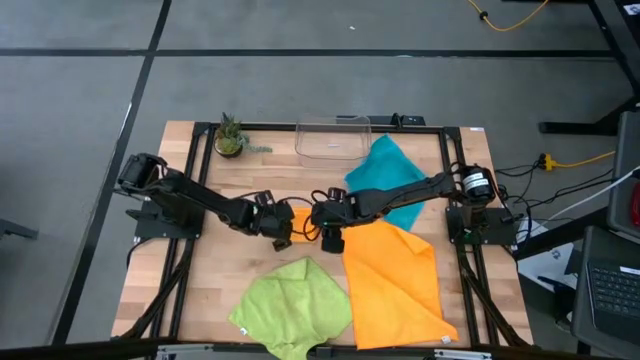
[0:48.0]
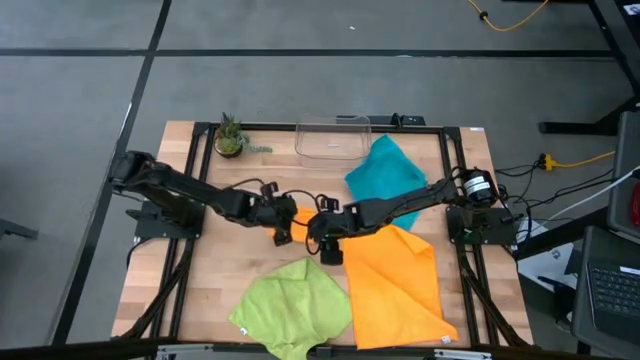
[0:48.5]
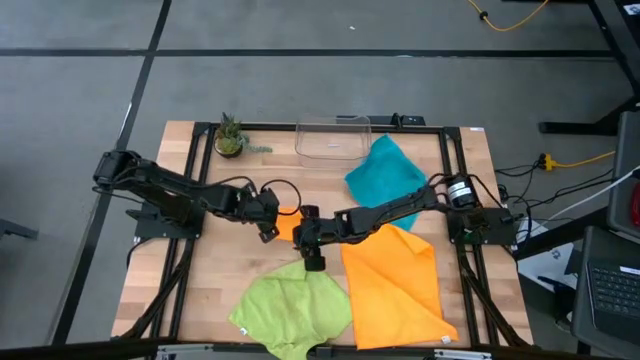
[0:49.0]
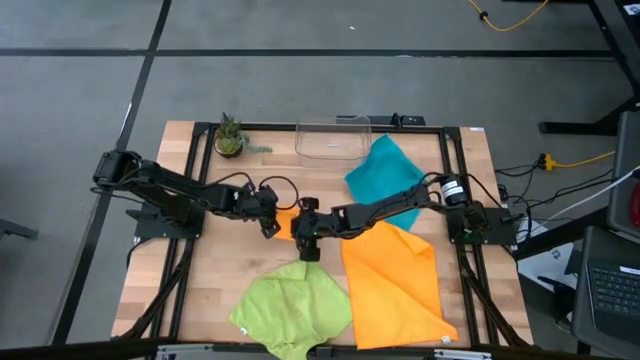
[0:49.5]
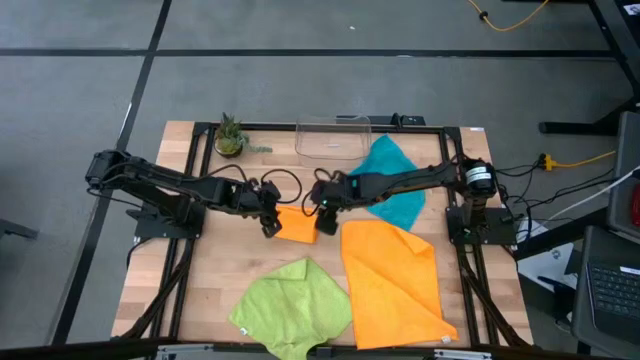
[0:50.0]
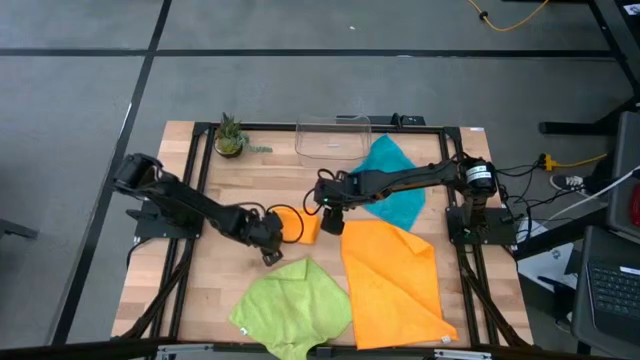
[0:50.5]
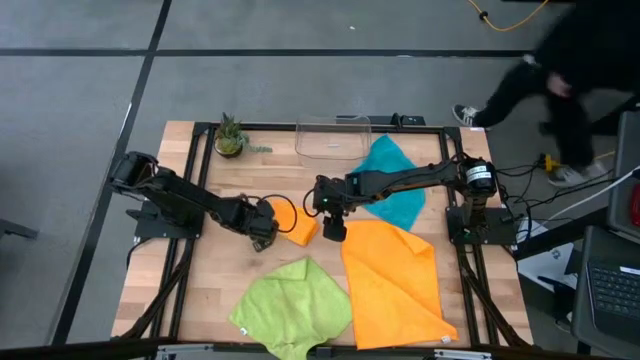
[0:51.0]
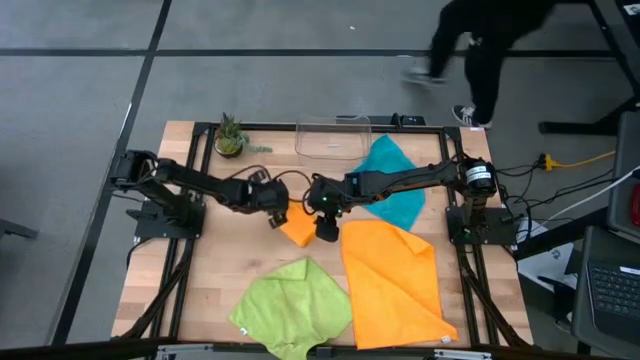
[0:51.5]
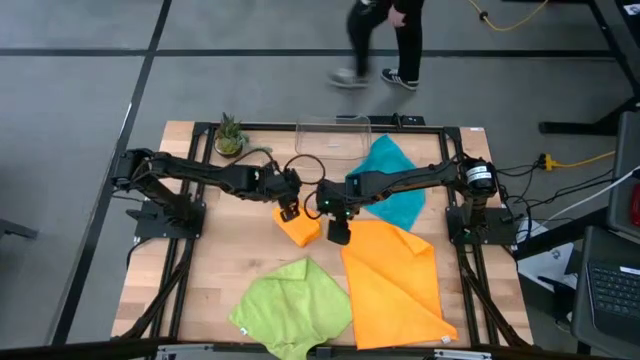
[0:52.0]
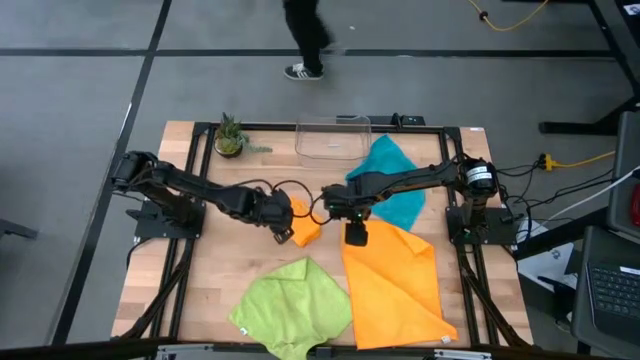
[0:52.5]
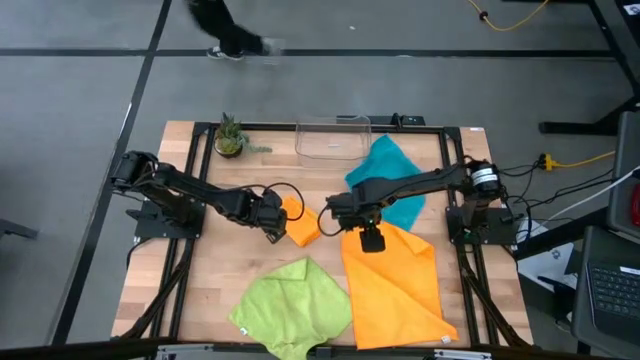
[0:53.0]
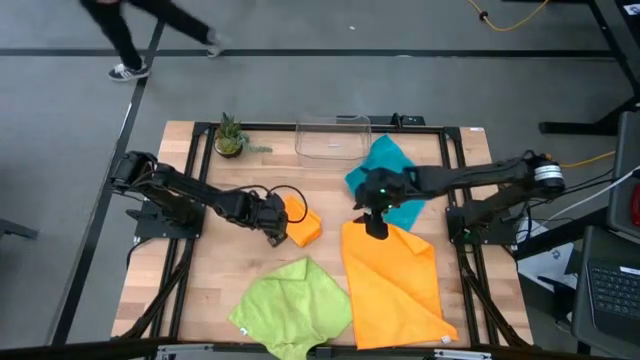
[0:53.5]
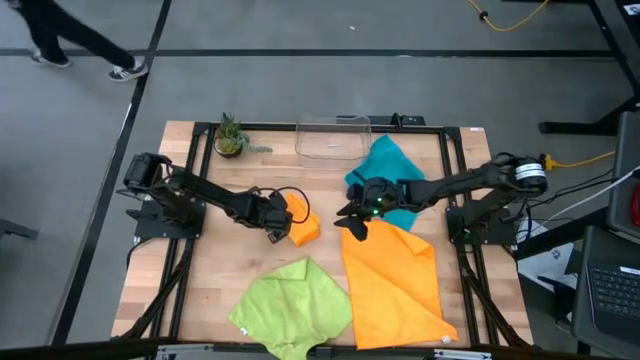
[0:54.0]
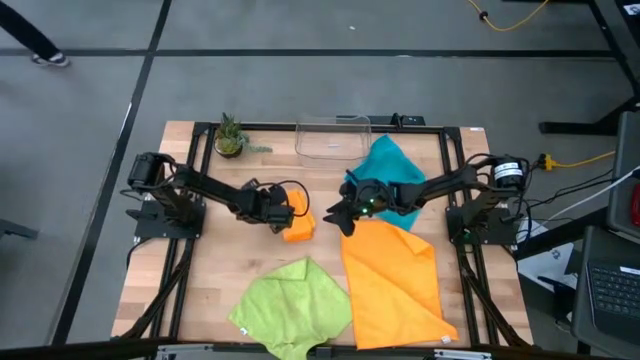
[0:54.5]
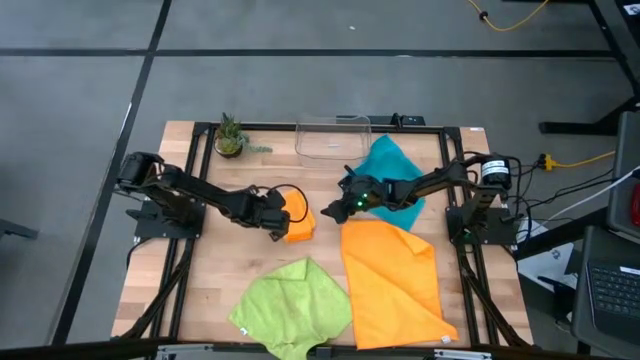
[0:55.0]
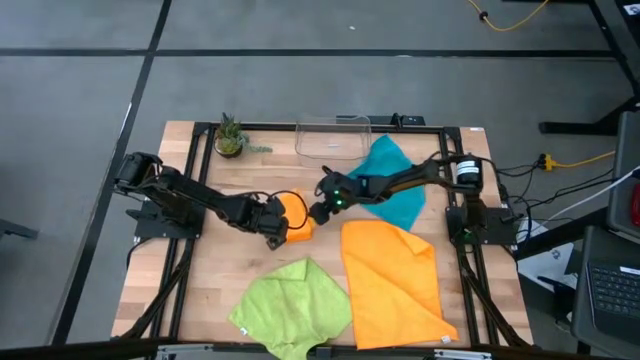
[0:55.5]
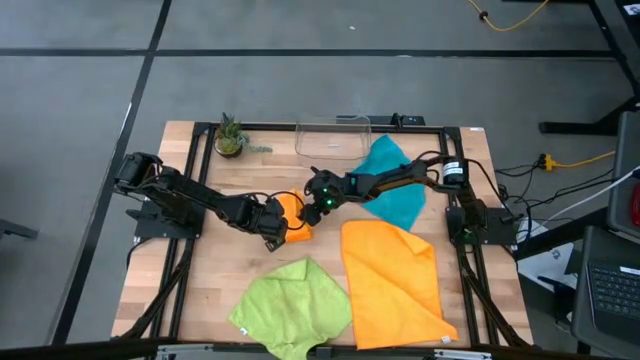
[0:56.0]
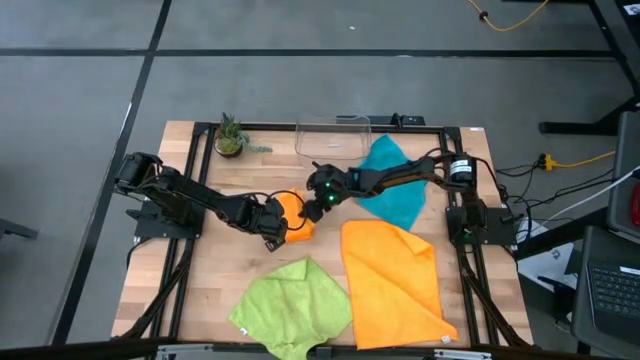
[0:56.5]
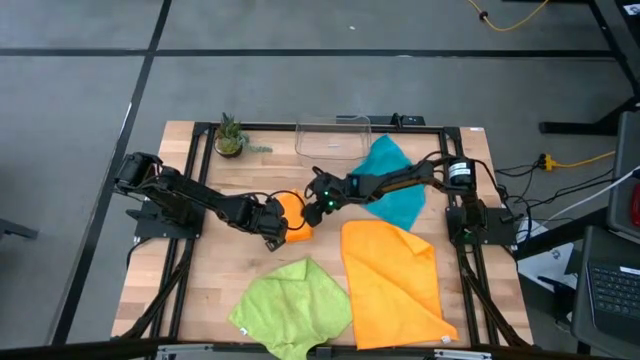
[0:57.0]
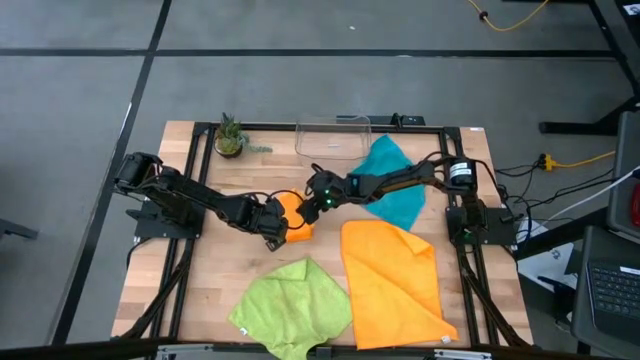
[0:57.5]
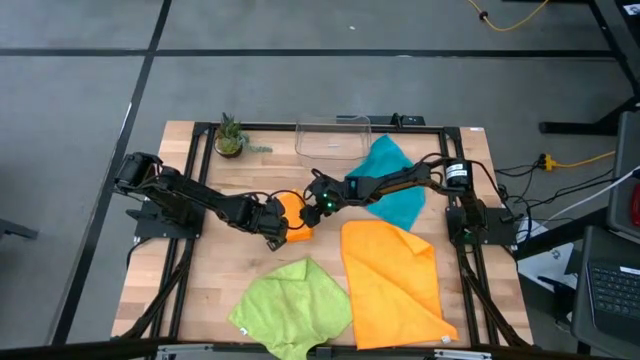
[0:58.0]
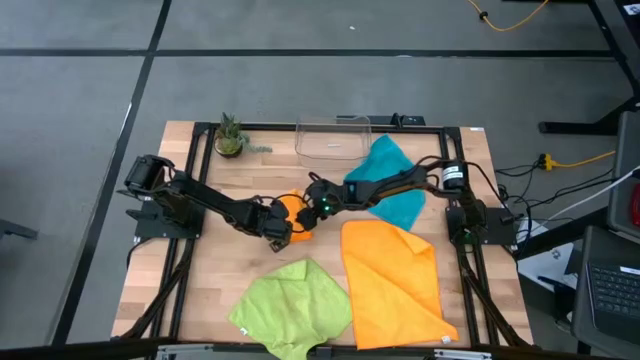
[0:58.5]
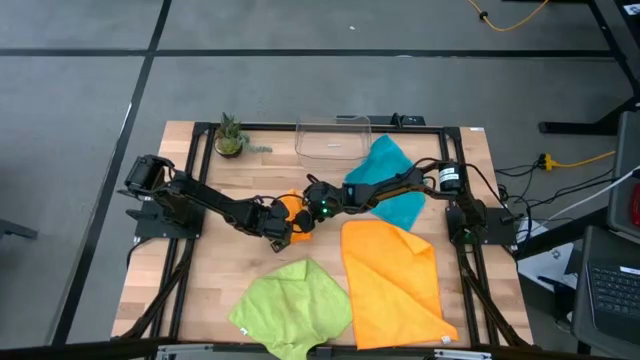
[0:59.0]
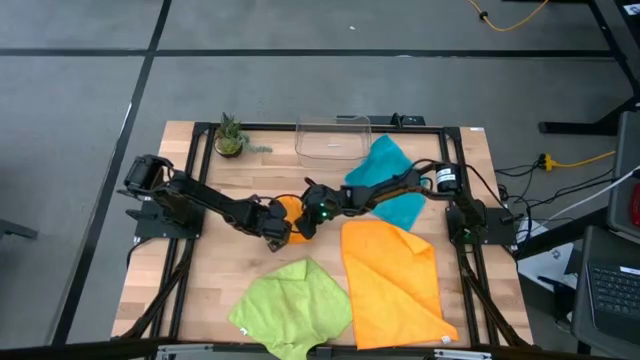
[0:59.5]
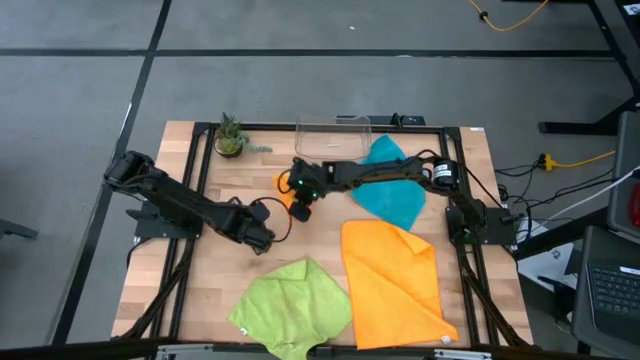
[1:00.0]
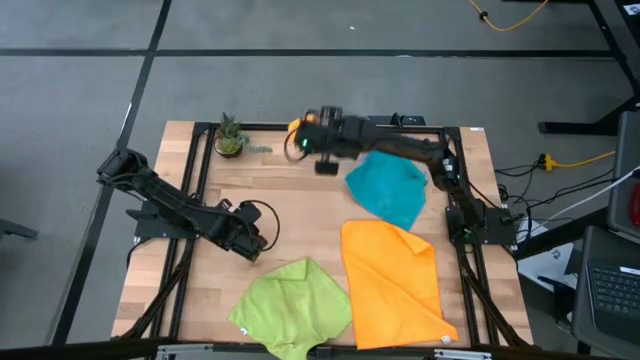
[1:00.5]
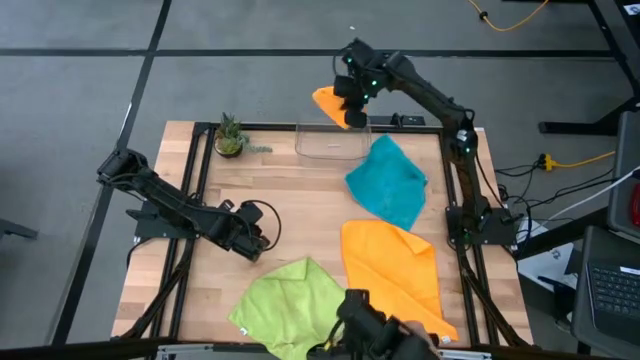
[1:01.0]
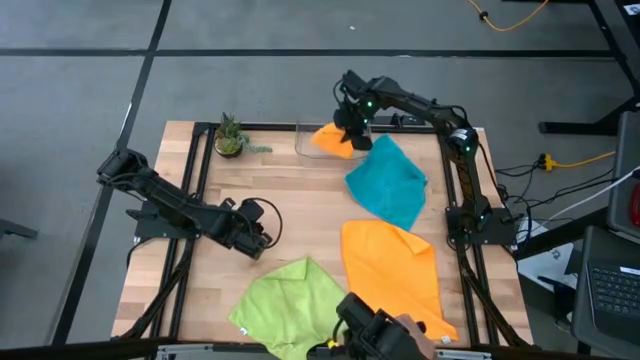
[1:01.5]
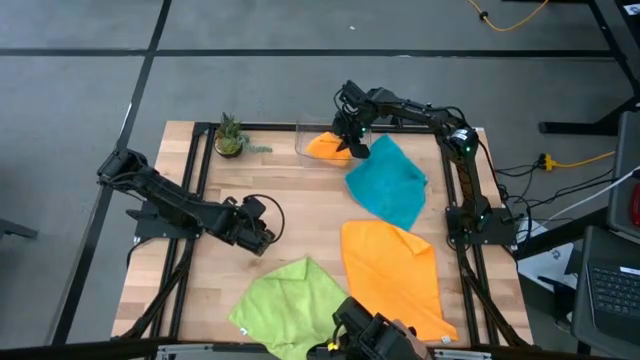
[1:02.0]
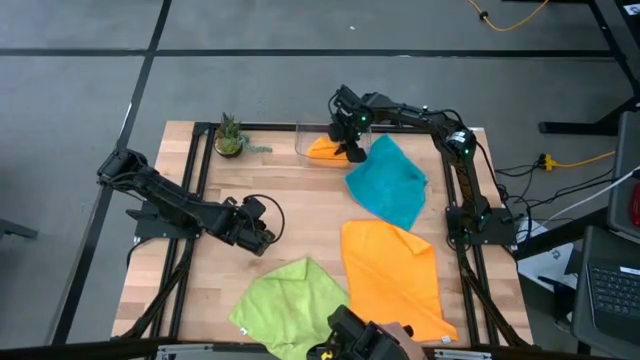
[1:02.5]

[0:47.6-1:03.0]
Task: Fold microfiber towels
Put the folded orange microfiber cloth into the transparent bin

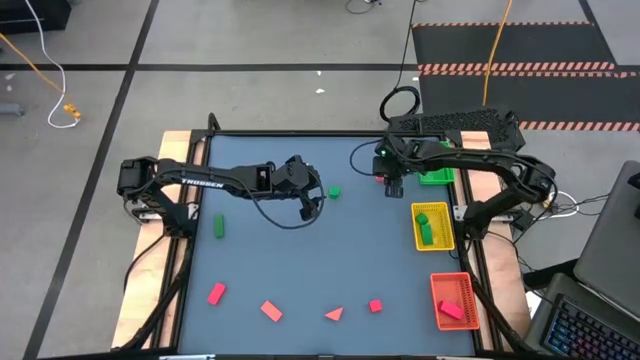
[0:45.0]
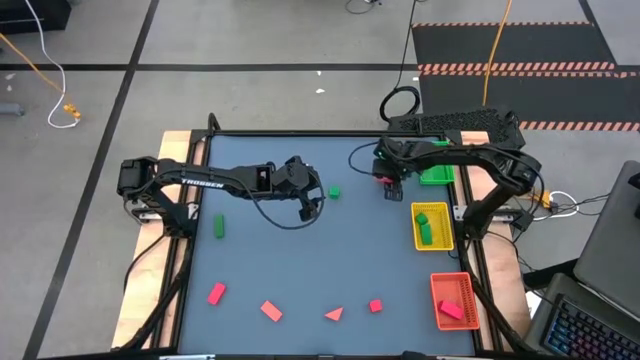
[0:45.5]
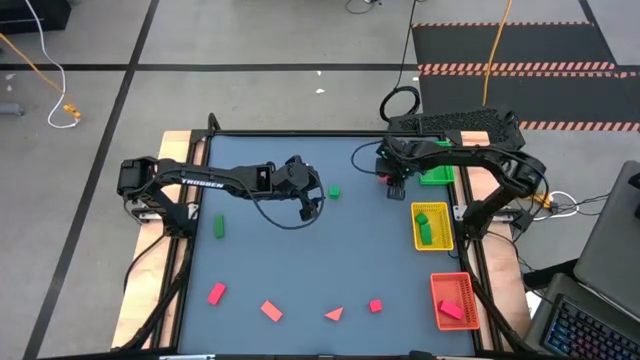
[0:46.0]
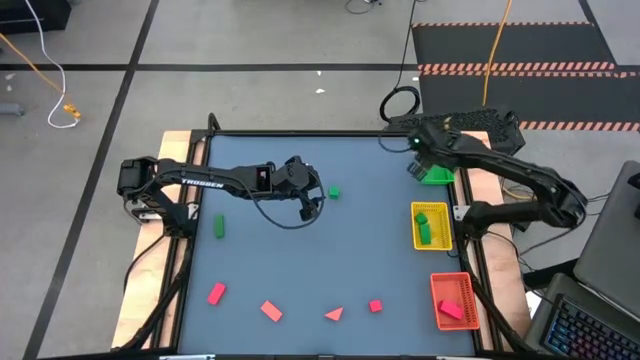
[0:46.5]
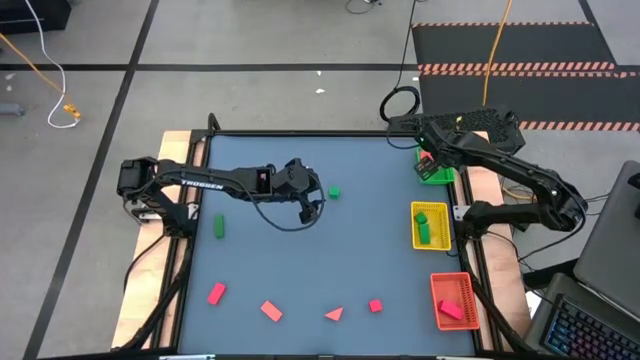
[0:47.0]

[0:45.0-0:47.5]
Task: Sort & place blocks by color
Put top left orange block into the green basket
